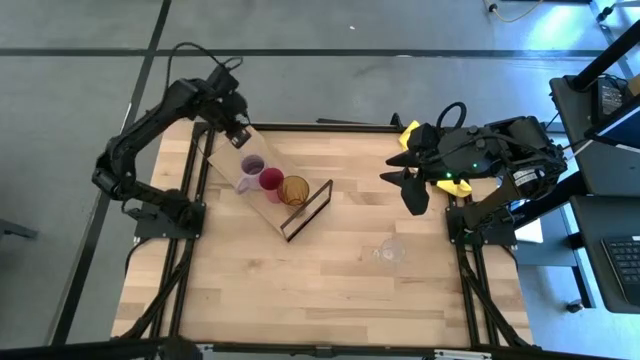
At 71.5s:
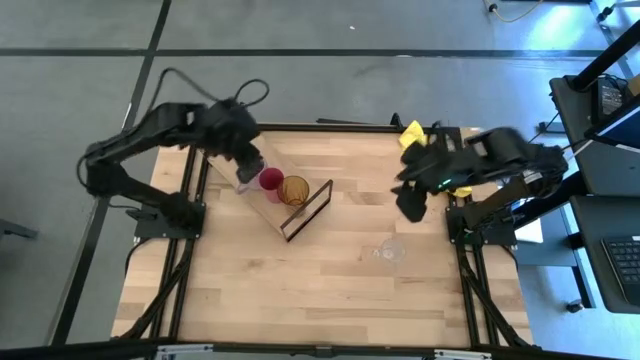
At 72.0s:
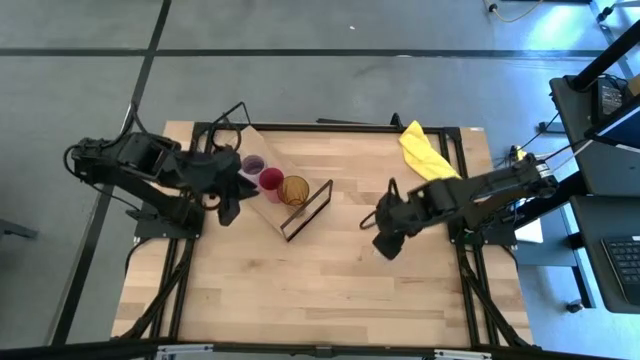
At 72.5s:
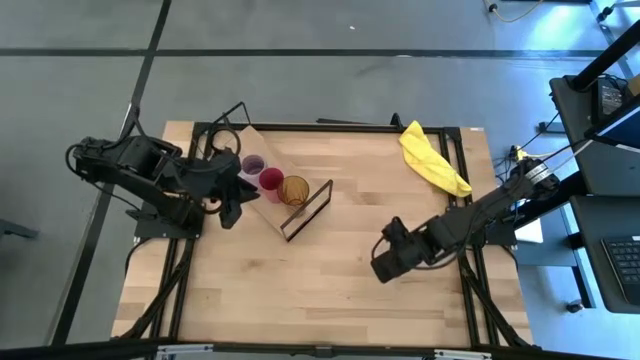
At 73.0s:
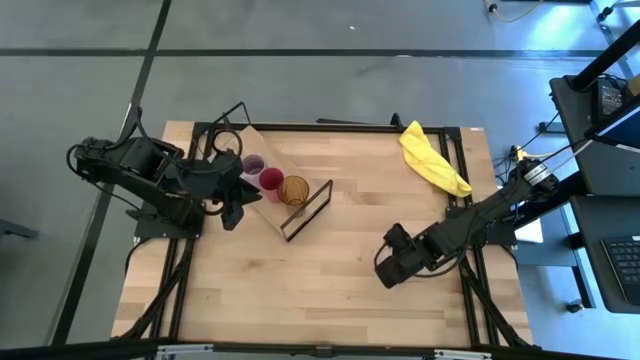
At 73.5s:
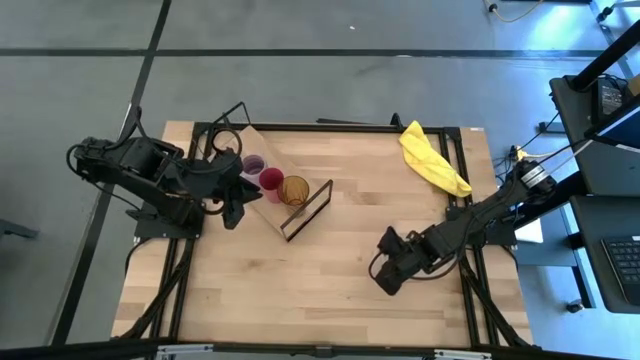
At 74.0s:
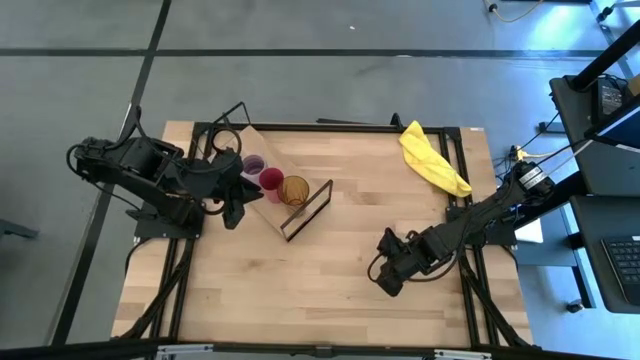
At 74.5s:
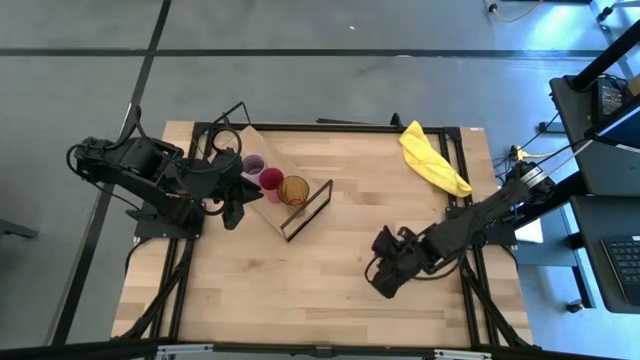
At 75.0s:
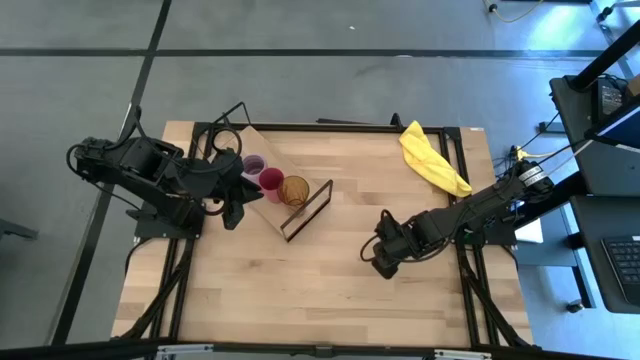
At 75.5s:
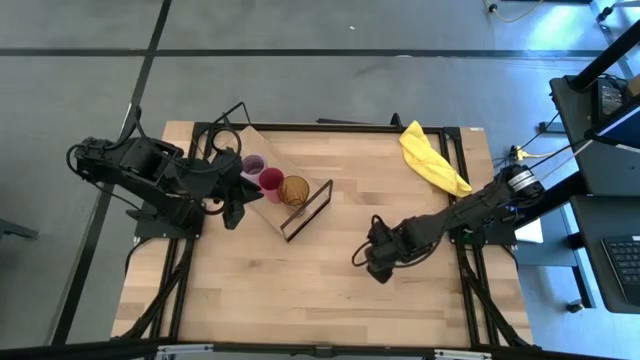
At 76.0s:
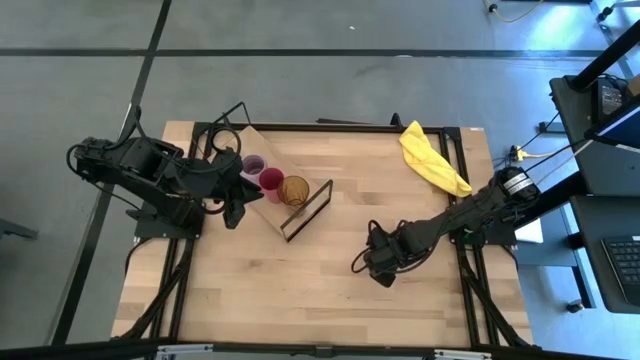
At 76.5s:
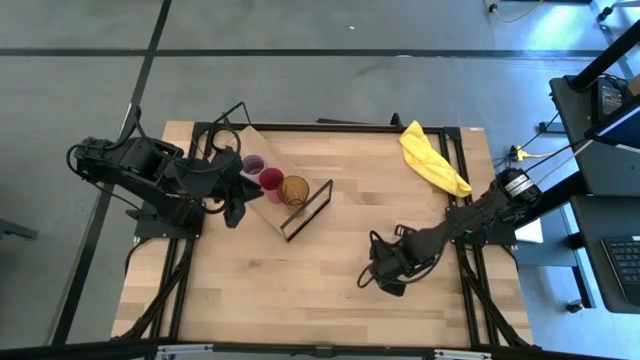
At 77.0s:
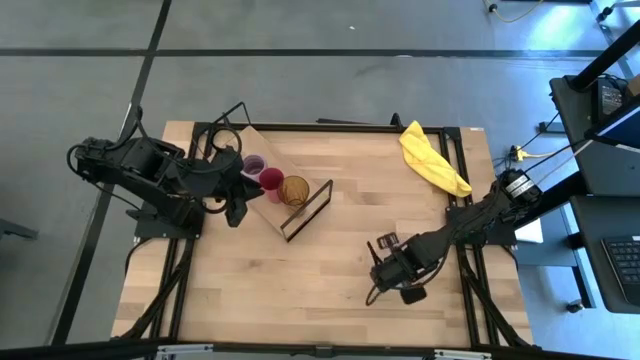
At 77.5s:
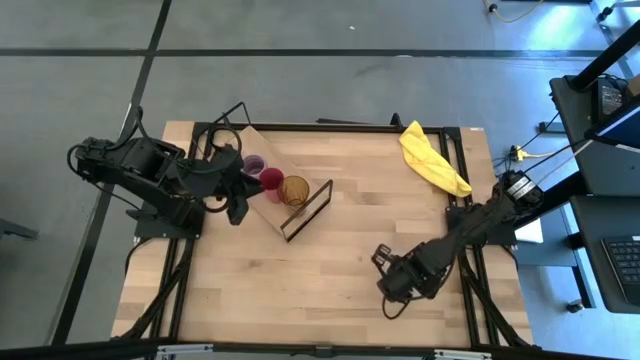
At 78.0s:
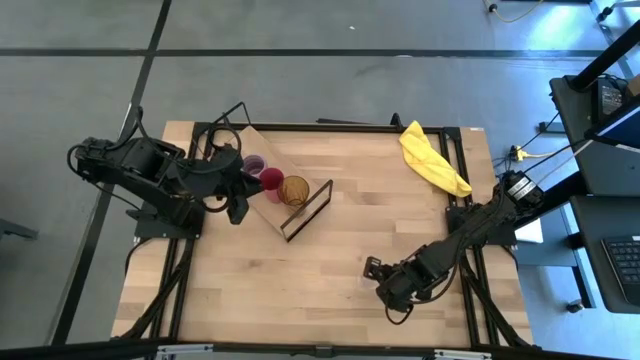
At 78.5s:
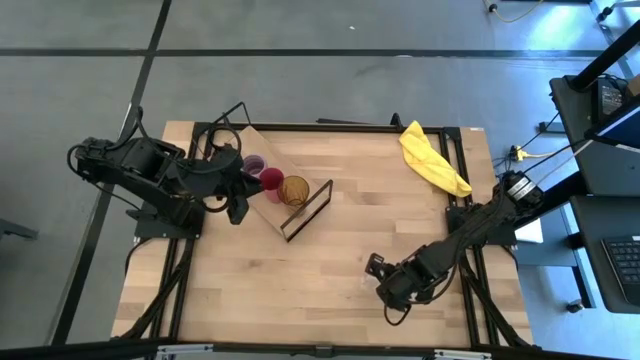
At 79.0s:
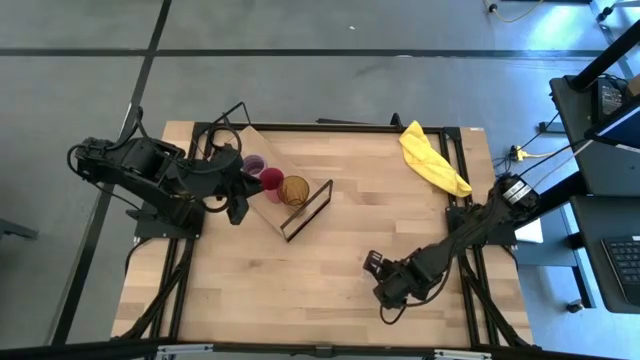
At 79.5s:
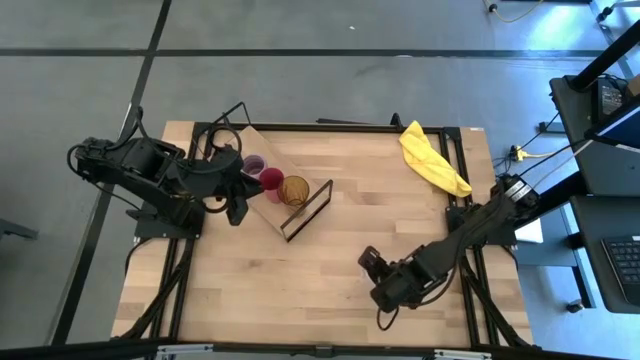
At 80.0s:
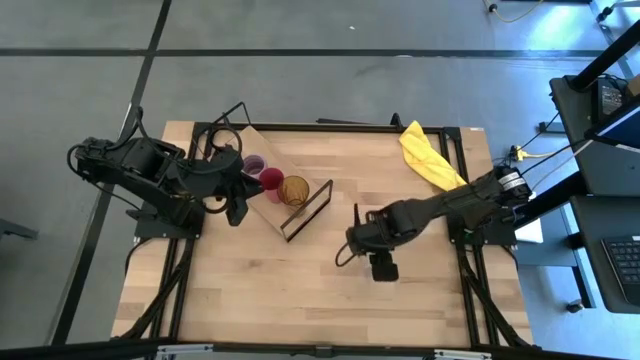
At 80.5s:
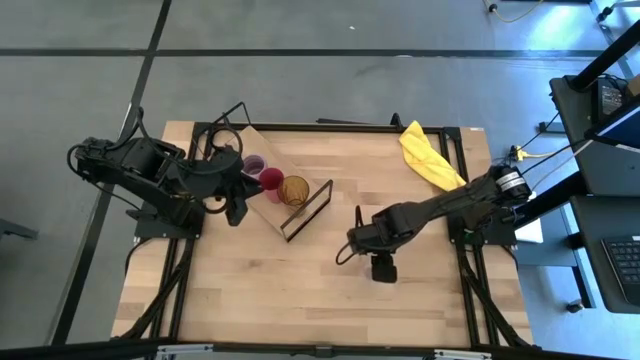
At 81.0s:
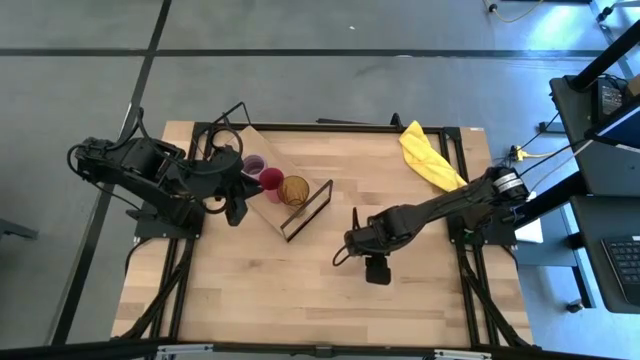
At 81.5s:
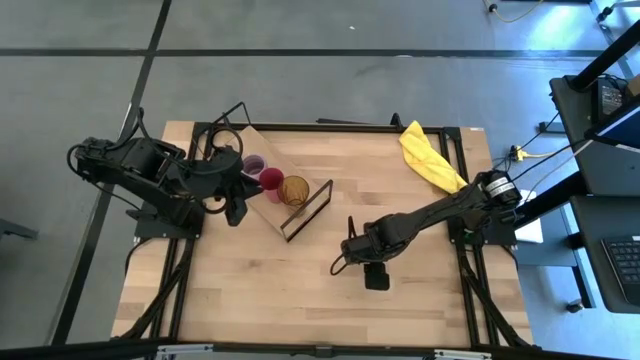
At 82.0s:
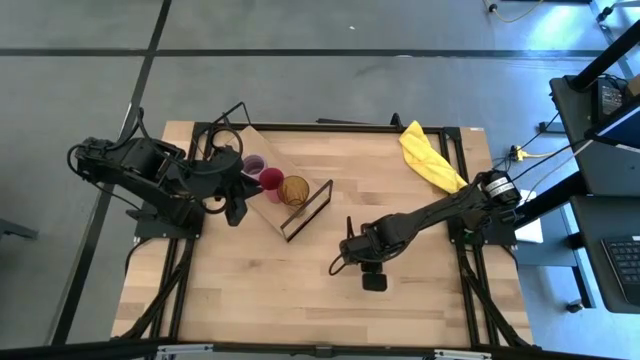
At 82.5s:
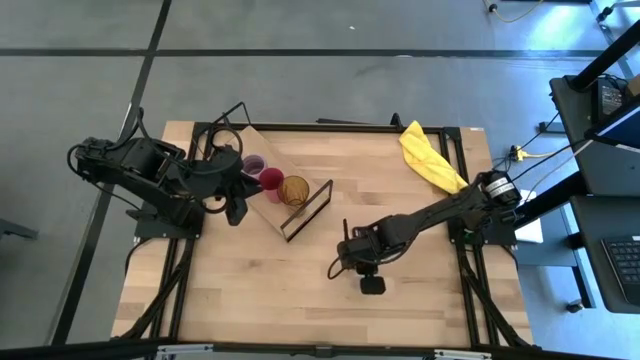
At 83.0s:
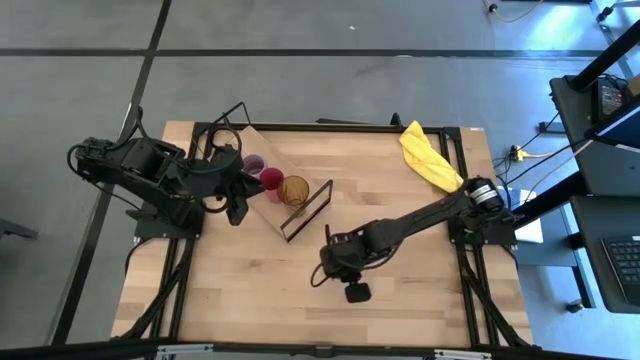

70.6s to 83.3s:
Task: Stack small to large cups/mugs on shelf
Put the transparent cup on the shelf

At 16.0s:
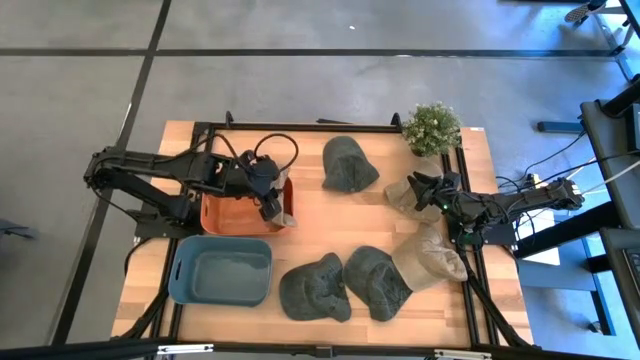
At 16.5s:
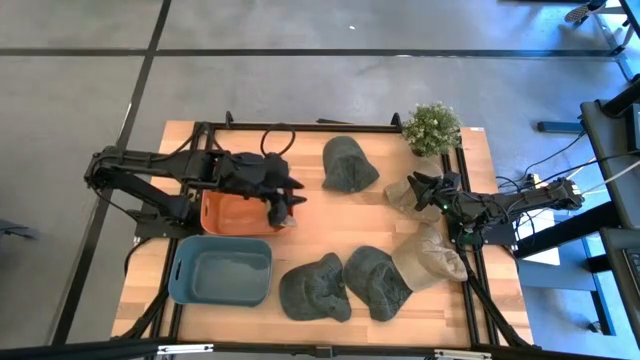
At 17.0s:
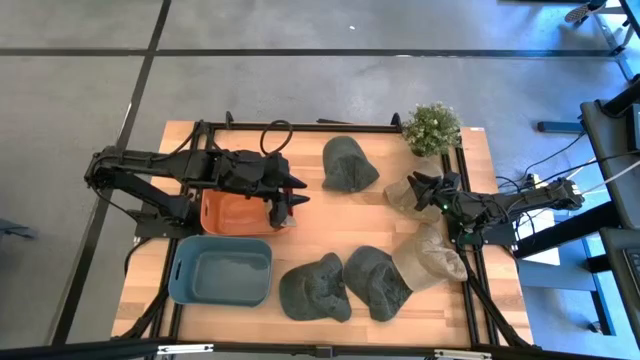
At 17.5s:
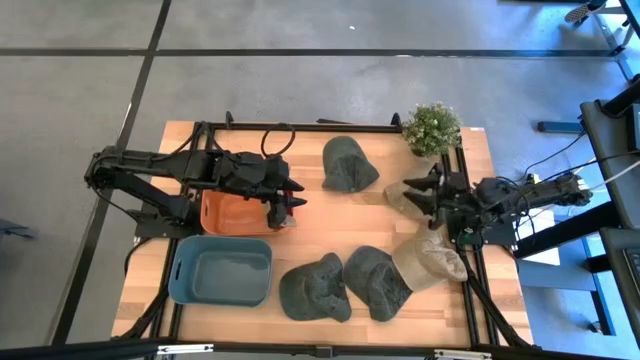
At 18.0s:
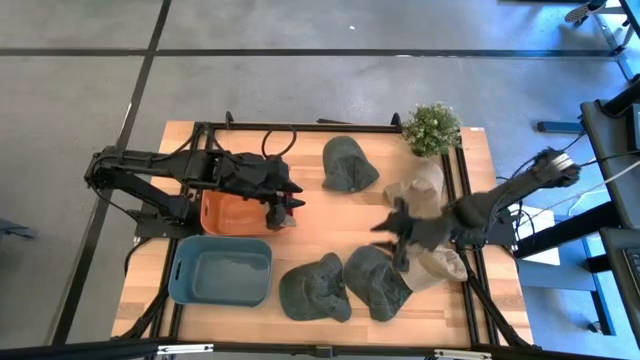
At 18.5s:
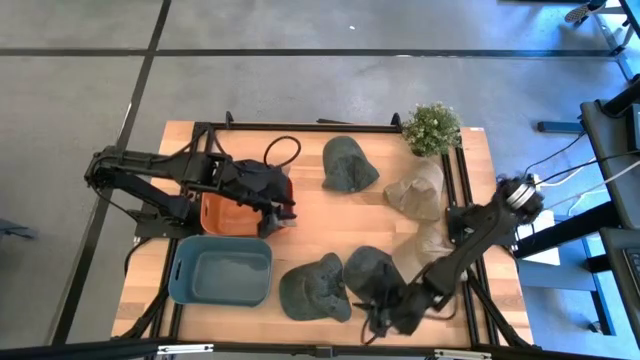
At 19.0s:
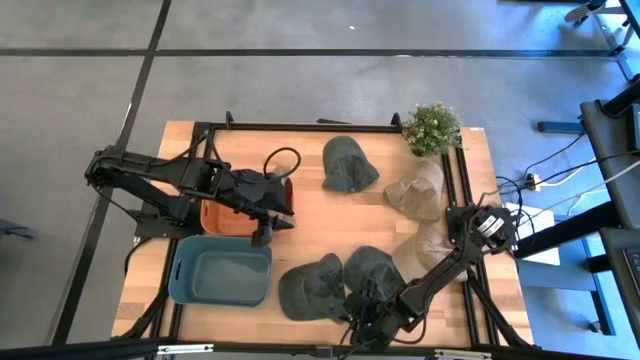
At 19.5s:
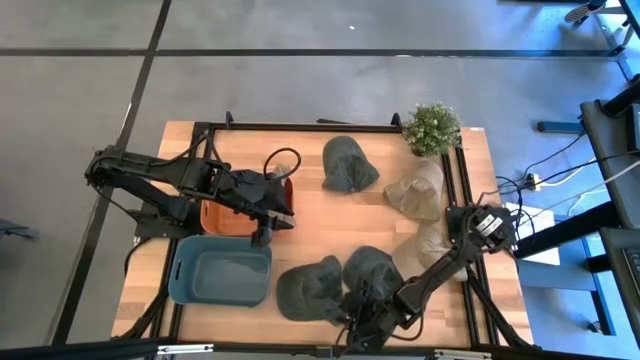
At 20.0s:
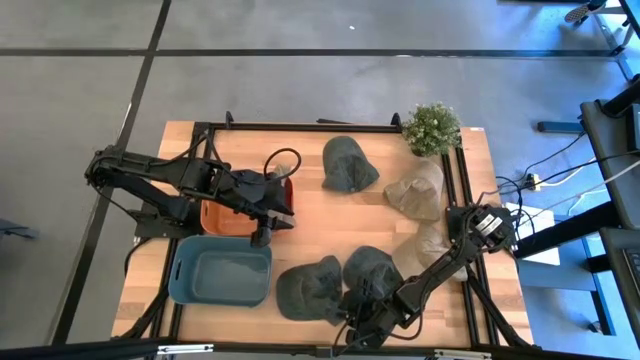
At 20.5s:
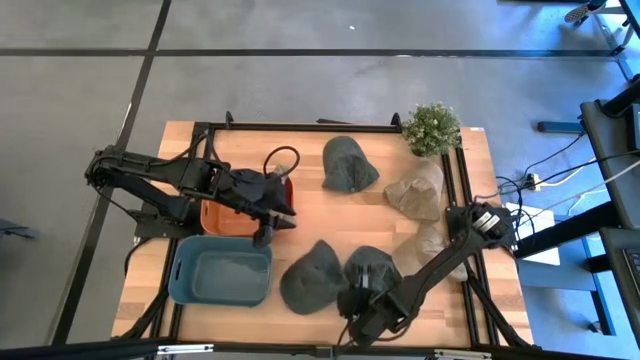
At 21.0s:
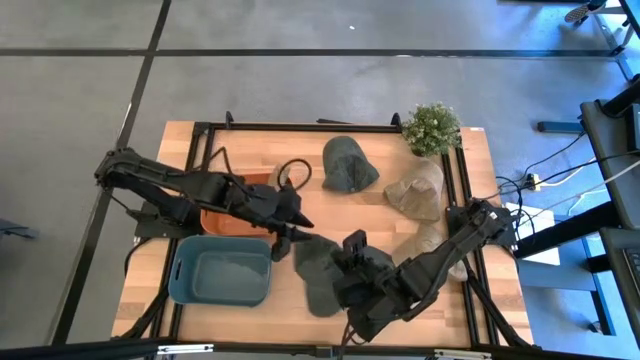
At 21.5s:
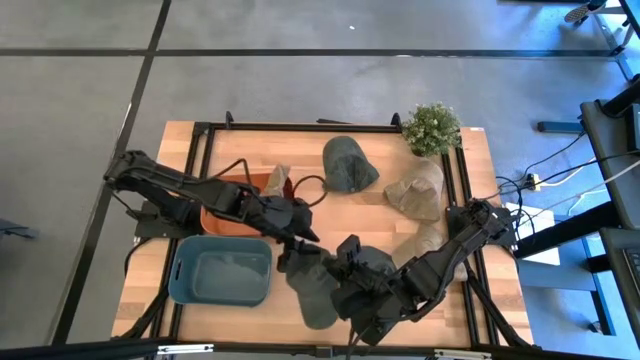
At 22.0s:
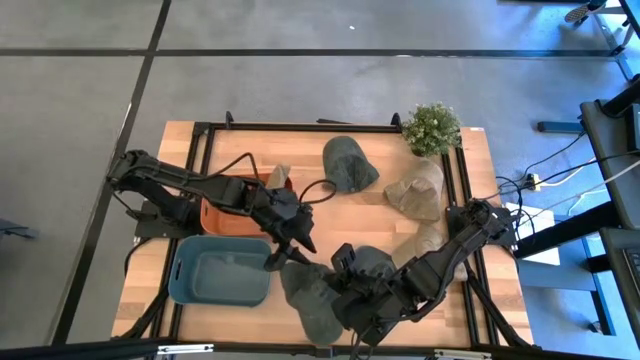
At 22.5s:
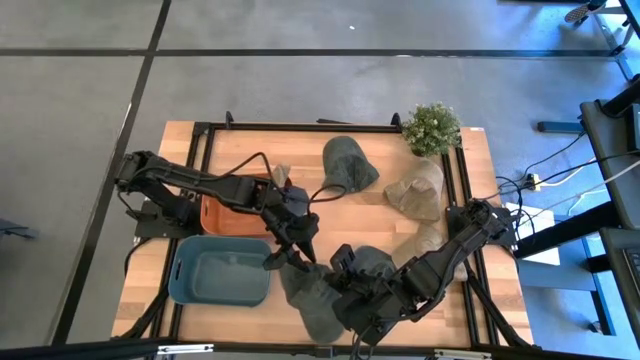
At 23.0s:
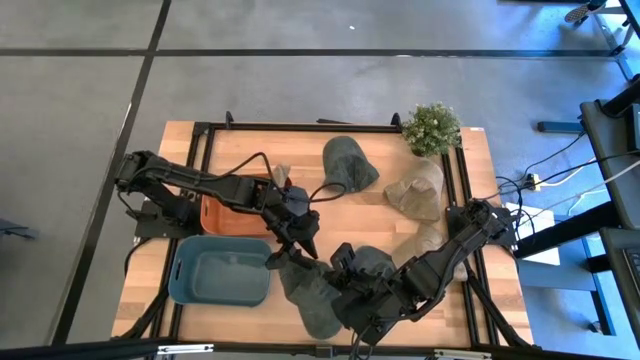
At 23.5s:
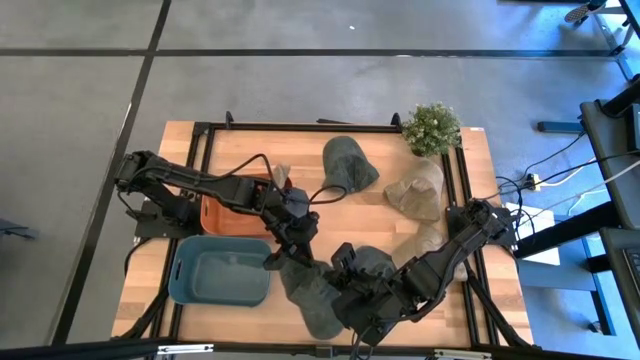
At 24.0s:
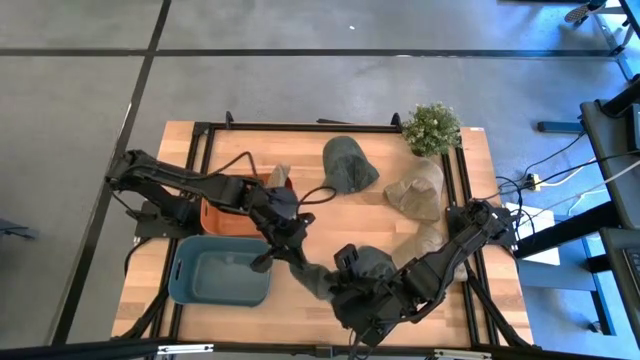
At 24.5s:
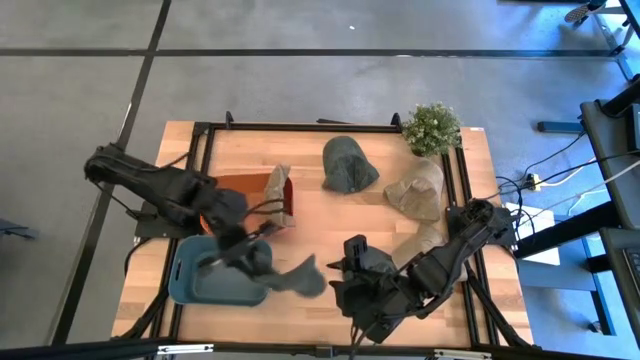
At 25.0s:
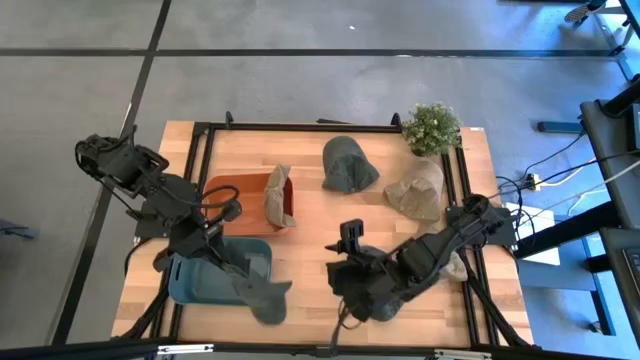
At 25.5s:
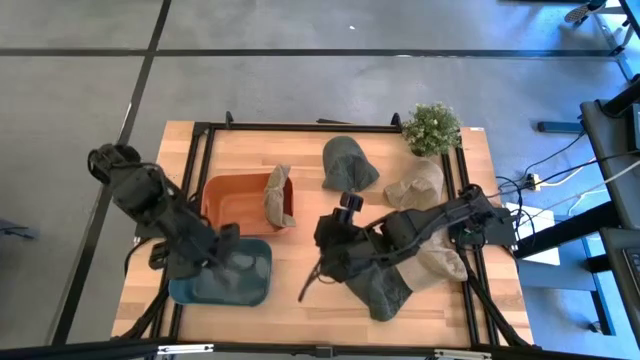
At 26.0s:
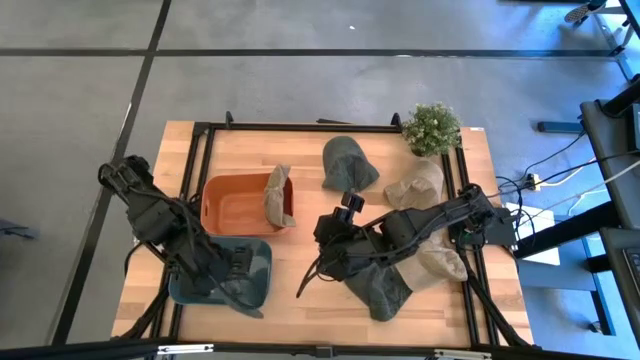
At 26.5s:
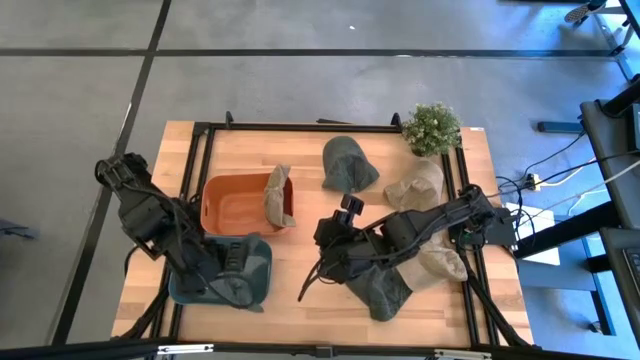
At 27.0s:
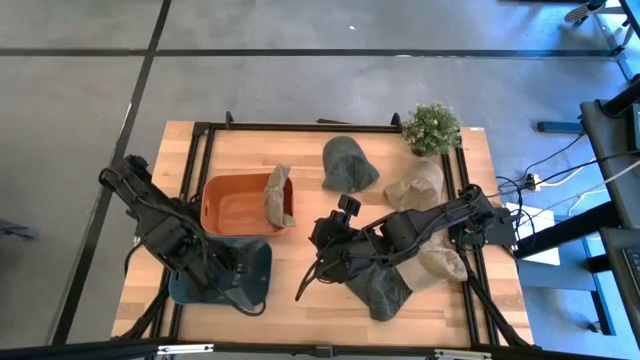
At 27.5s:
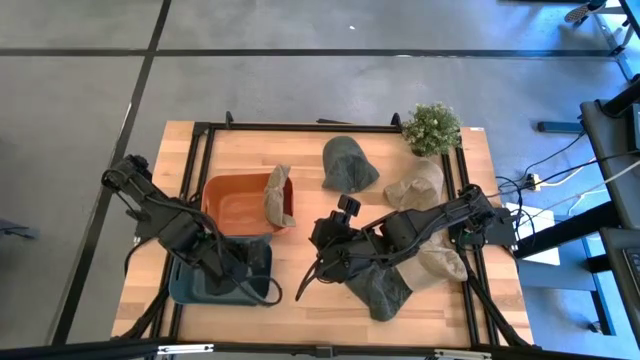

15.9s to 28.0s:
Task: Pick & Place hat
Put the bottom left gray cap into the blue bin
